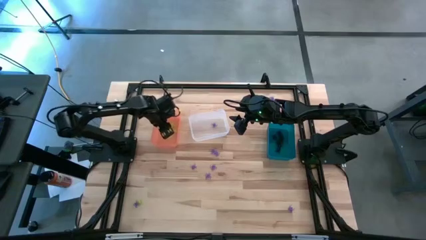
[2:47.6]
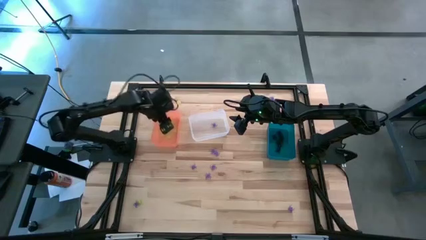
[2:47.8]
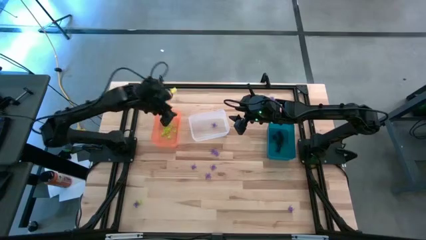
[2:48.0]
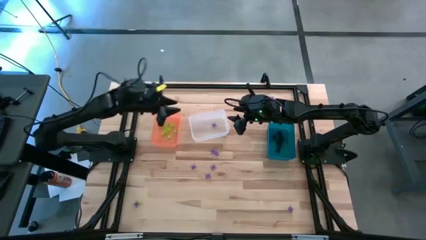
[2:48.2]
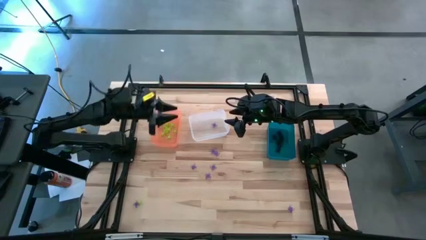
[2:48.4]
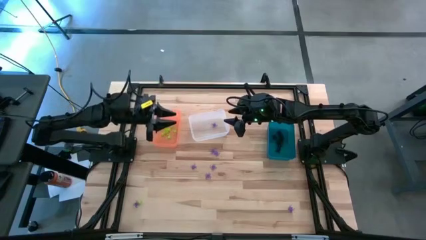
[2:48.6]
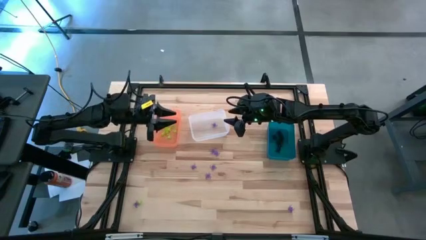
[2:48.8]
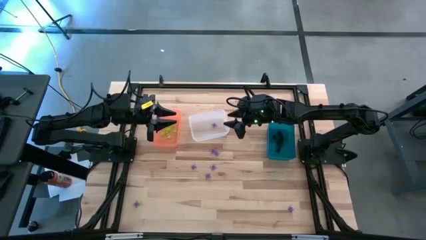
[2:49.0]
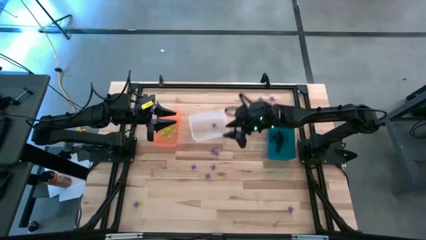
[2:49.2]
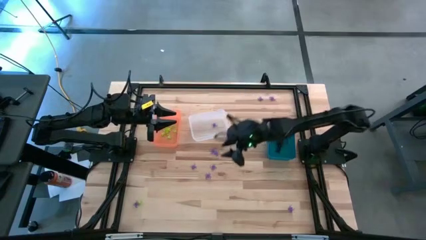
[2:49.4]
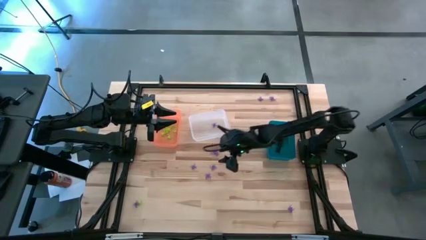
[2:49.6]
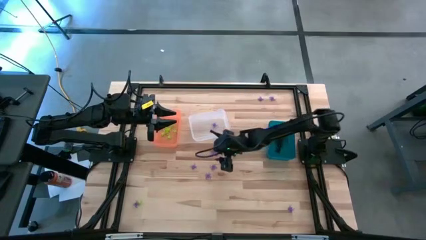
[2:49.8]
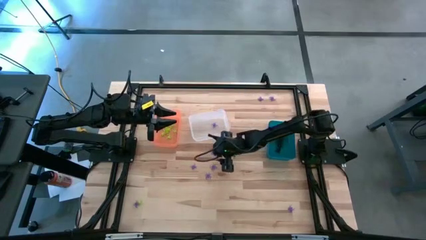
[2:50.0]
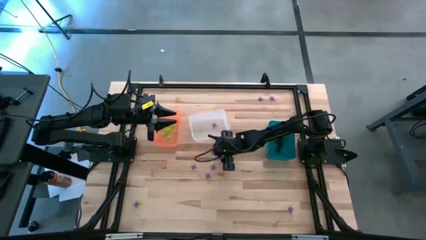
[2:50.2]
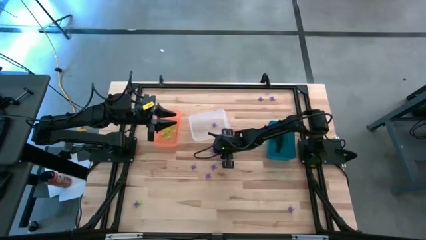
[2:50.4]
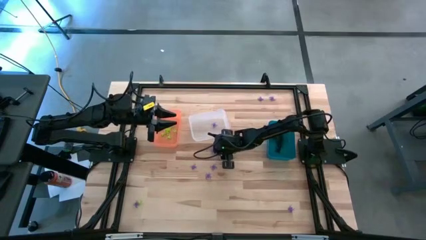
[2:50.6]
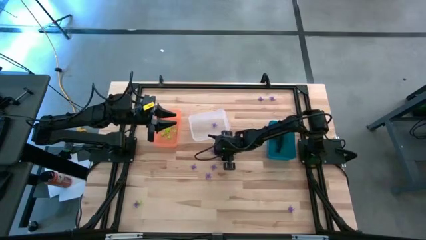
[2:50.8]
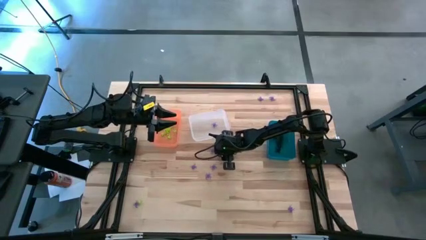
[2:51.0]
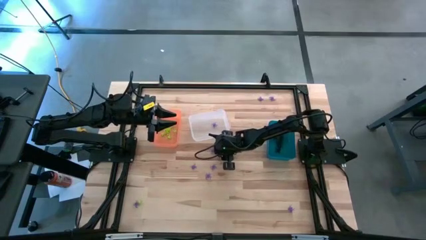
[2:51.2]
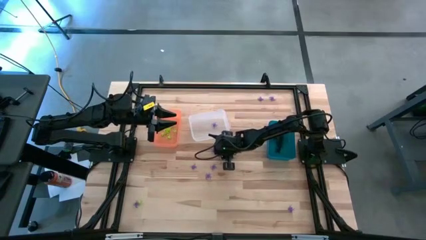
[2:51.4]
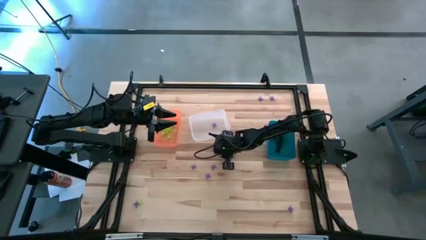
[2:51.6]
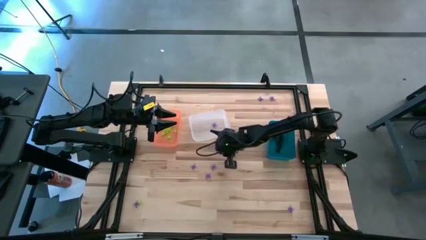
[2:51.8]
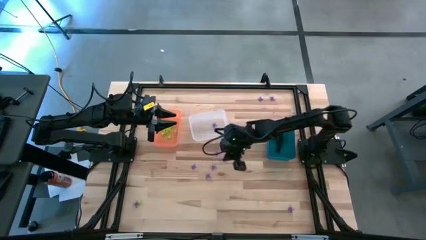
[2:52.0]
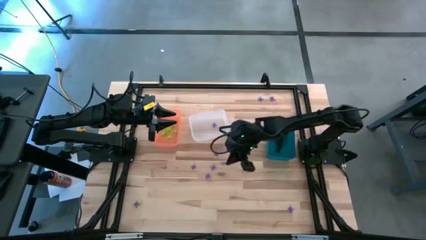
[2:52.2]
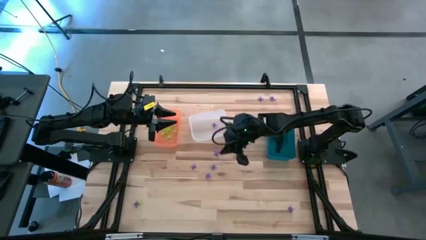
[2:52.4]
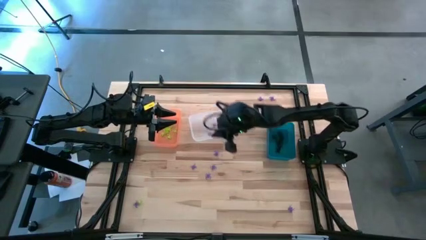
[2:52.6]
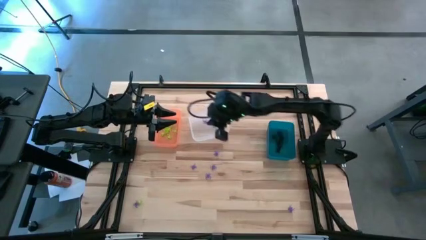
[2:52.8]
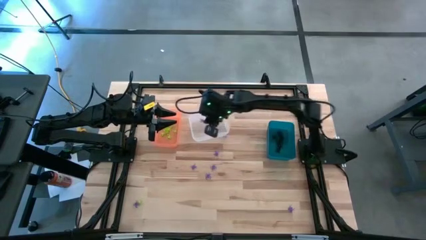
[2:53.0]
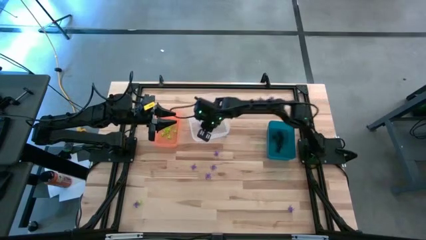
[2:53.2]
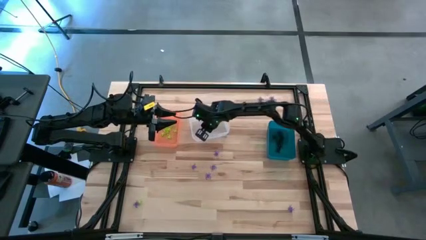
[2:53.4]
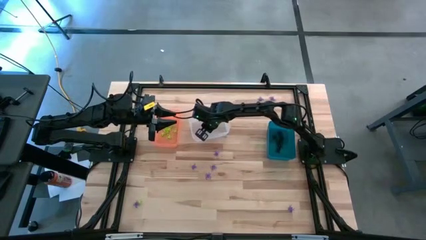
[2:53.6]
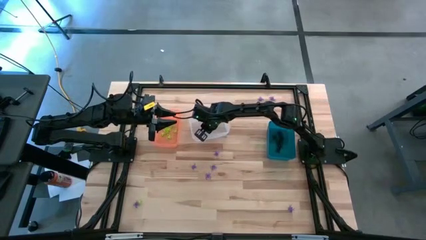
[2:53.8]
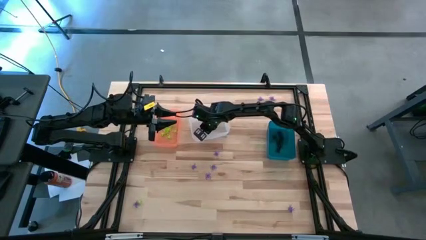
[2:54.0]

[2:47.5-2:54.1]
Task: Sort Halloween decoration
Put the purple spider toy into the transparent bin

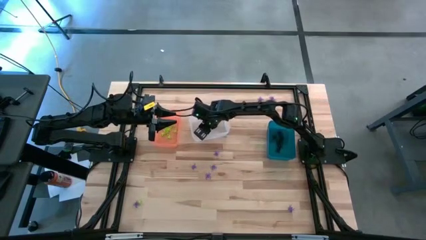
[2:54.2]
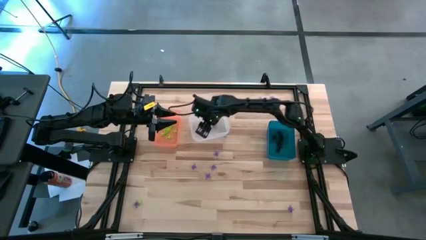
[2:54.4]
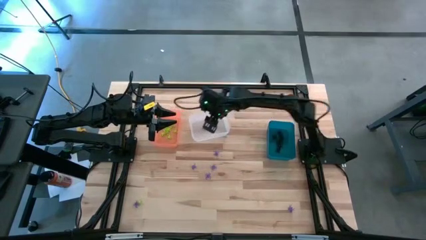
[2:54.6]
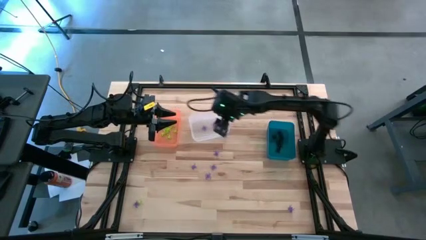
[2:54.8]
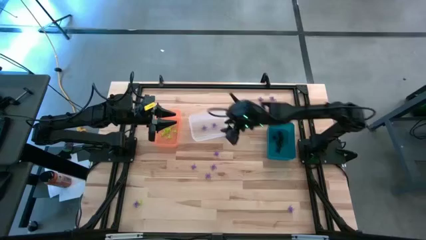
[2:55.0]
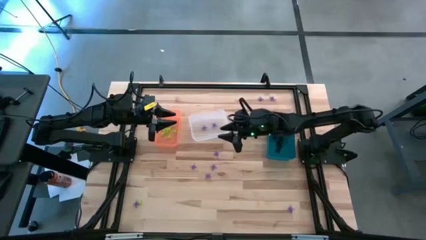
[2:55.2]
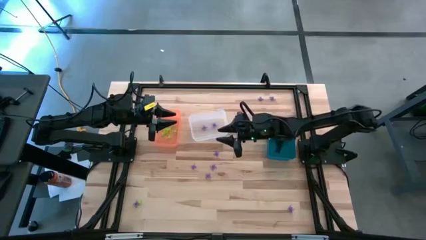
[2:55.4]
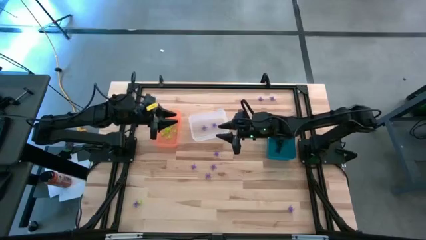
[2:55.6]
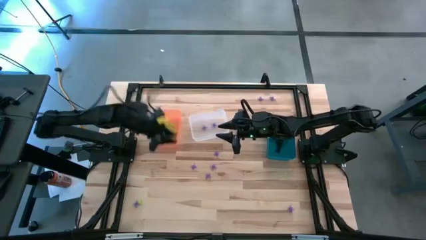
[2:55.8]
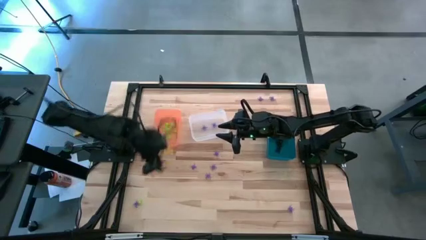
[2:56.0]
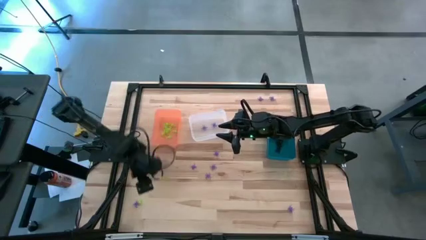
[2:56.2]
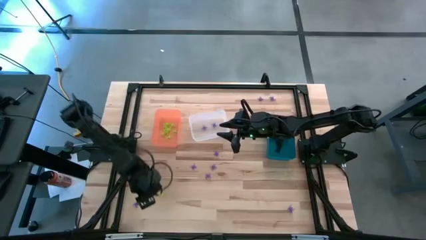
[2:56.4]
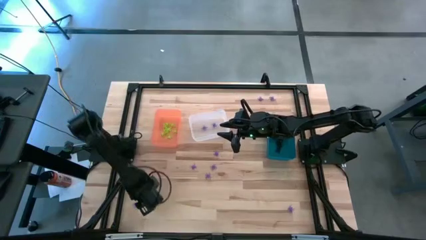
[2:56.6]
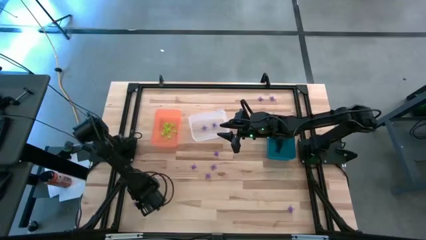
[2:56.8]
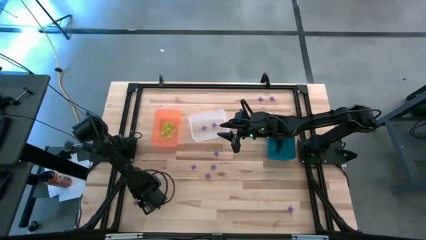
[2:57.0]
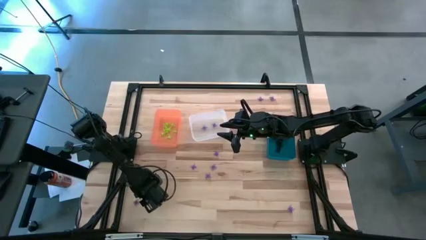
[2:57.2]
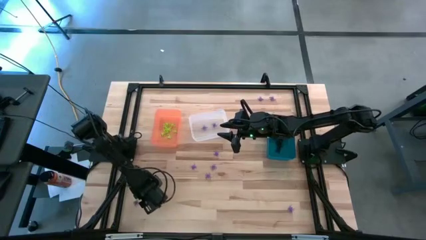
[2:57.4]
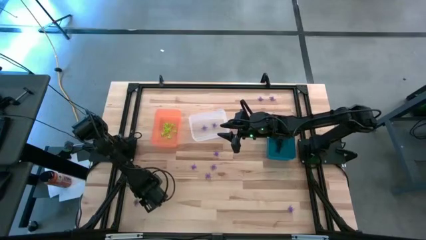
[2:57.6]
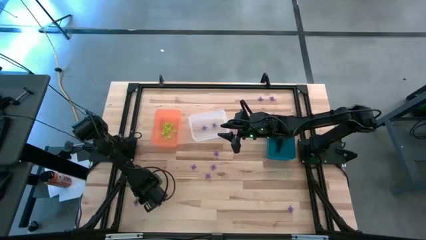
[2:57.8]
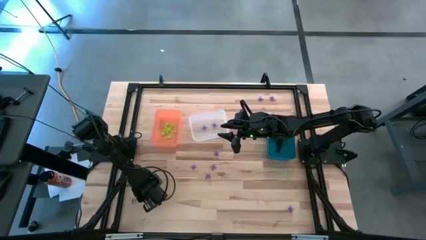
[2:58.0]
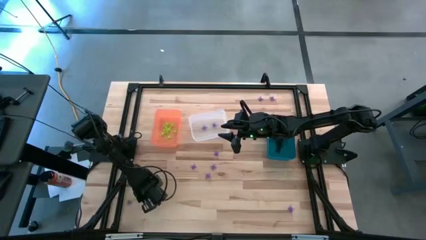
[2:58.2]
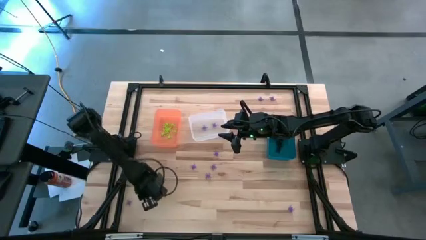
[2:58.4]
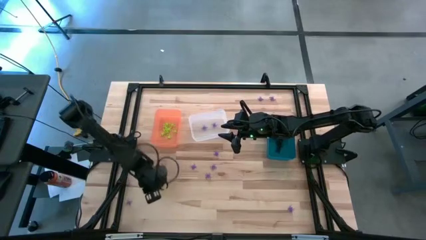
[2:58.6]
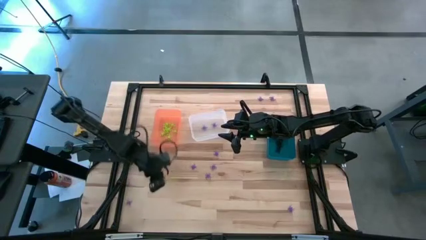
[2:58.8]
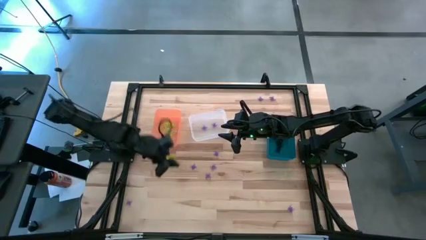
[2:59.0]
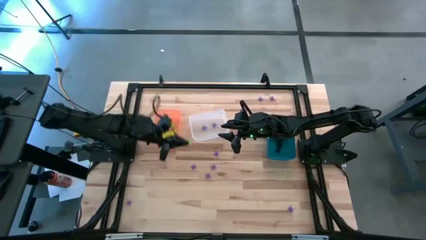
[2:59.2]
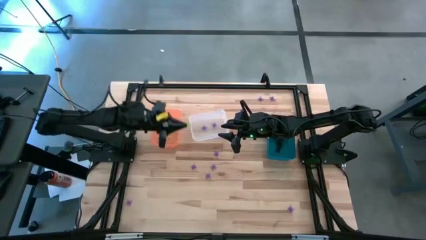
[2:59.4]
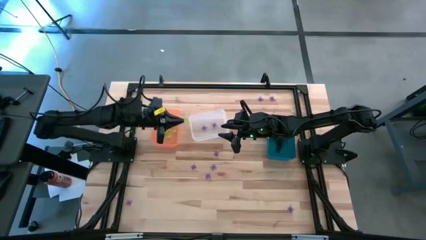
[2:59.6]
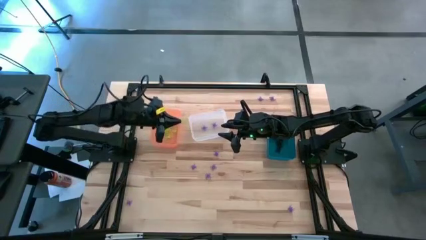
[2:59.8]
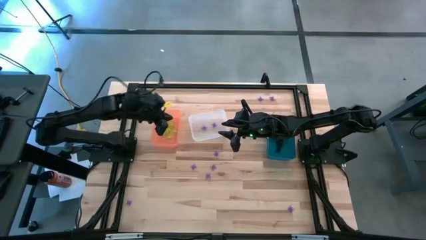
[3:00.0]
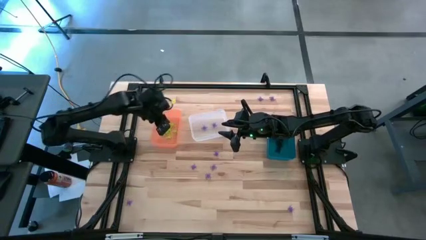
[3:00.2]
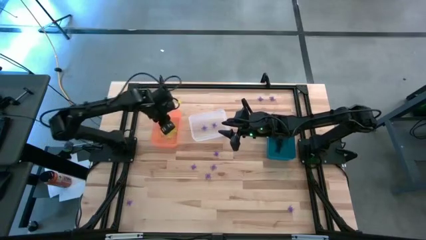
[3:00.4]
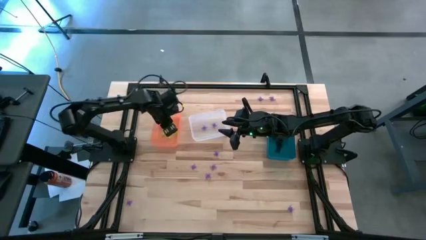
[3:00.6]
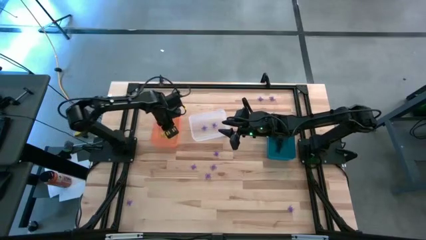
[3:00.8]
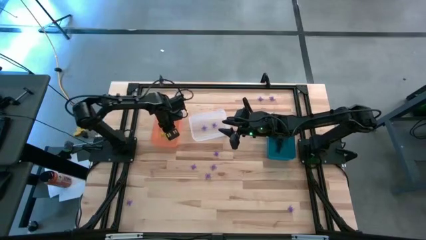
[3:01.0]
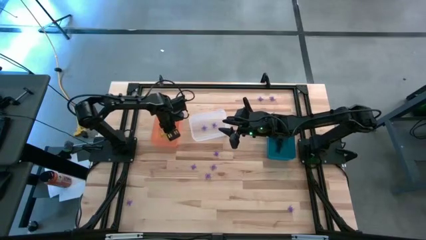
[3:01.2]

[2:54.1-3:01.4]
Put the green spider toy into the orange bin

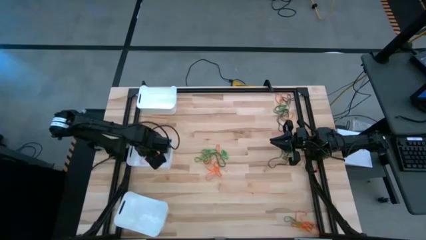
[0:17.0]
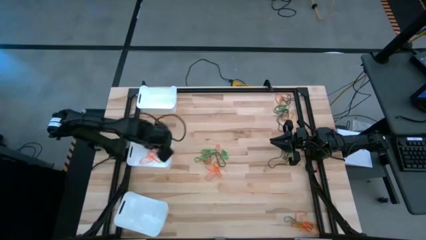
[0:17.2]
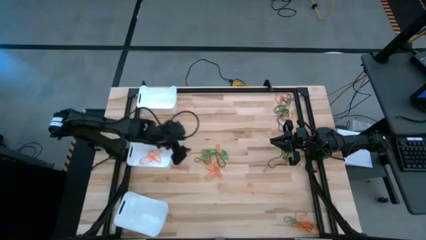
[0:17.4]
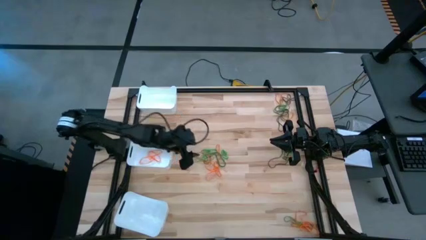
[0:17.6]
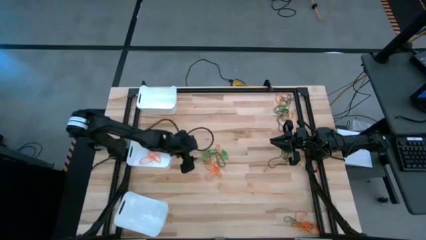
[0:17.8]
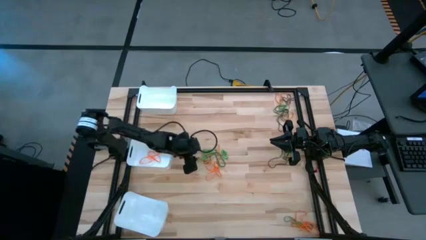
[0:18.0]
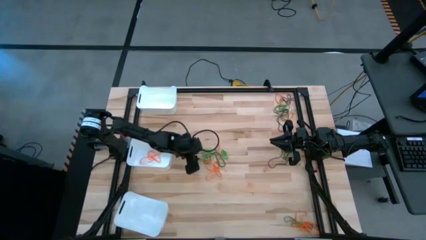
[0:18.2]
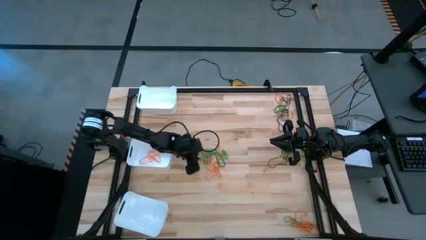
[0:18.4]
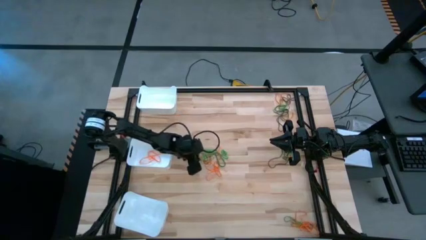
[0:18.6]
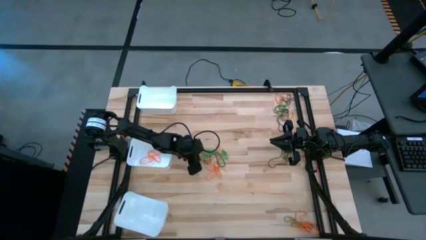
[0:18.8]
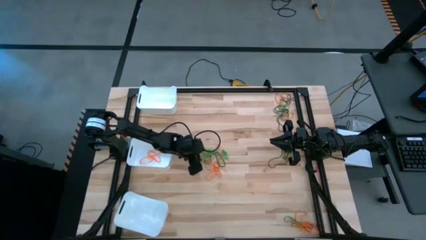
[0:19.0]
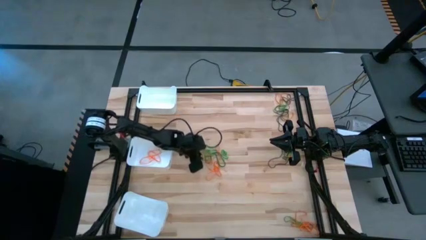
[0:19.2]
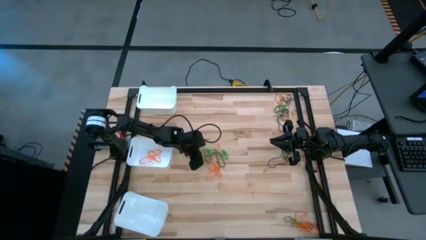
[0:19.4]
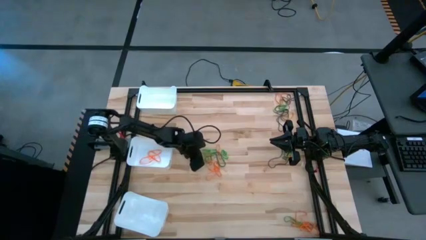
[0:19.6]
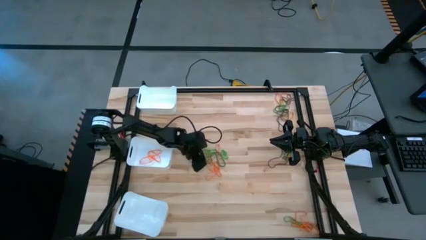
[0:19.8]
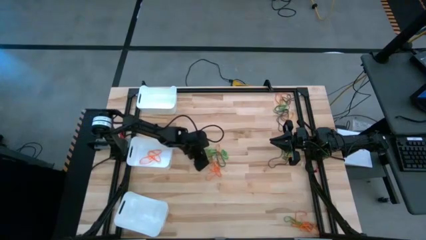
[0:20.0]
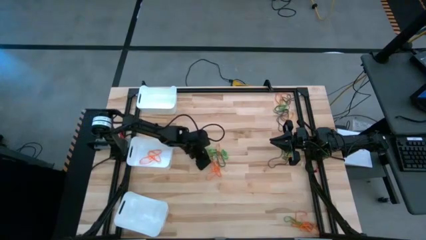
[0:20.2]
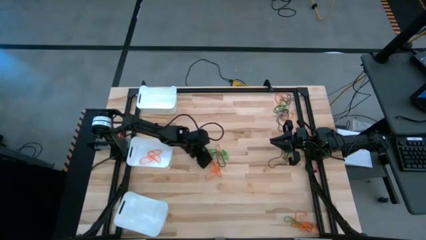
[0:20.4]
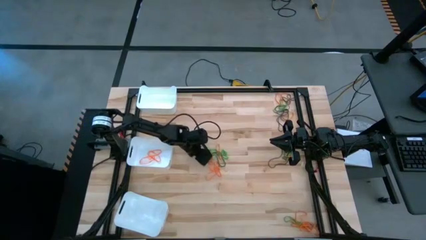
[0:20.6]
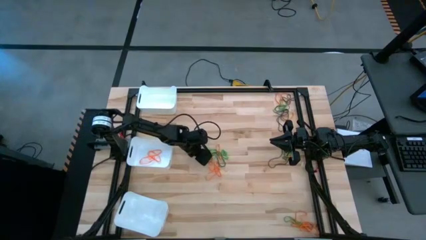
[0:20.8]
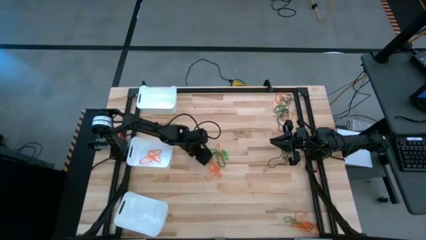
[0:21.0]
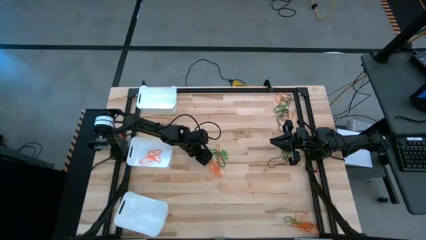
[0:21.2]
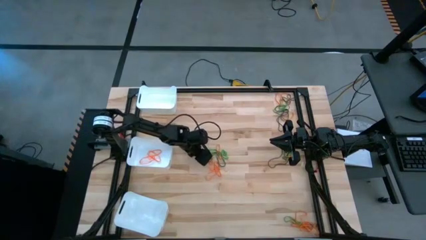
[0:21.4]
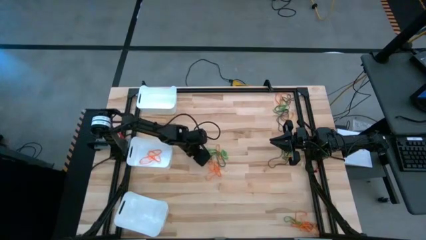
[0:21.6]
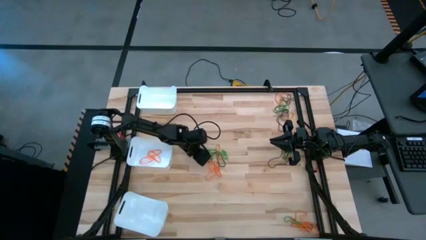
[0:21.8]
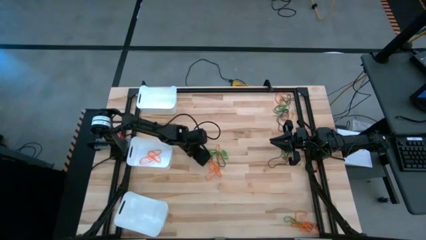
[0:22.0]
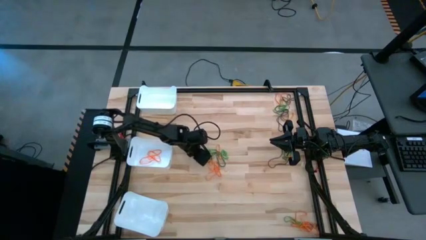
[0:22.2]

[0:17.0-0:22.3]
Task: Sort rubber bands into baskets
Put the orange rubber band into the middle white bin
